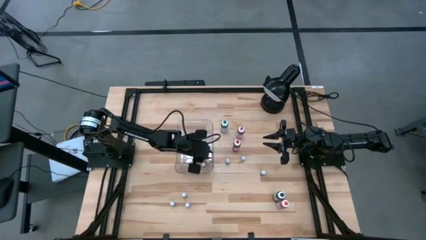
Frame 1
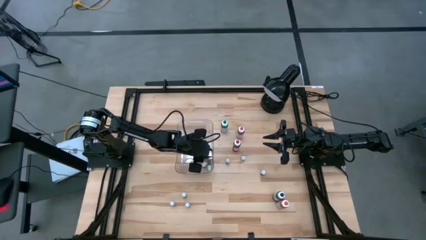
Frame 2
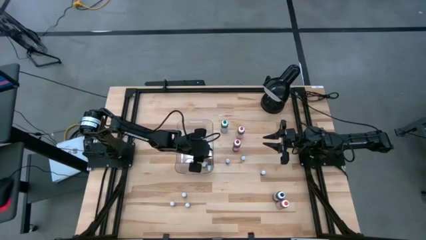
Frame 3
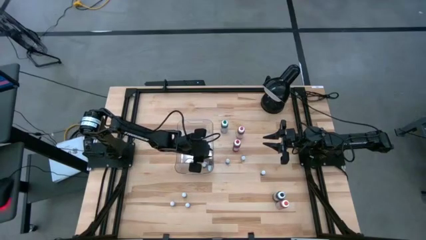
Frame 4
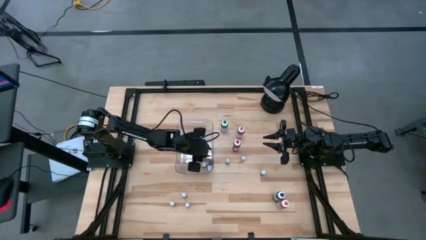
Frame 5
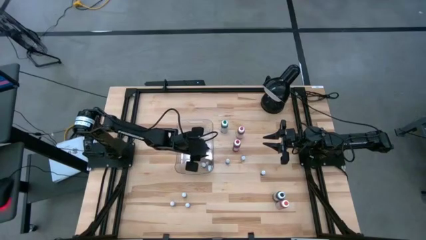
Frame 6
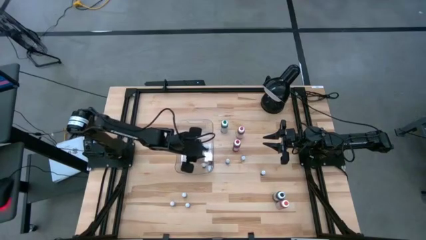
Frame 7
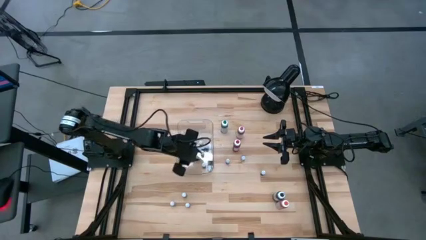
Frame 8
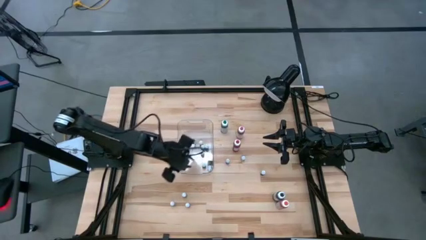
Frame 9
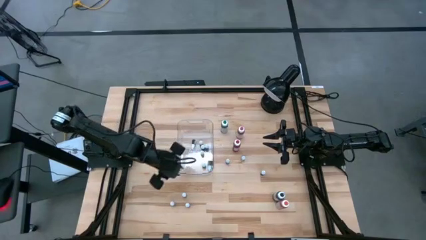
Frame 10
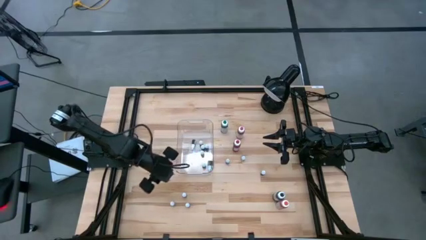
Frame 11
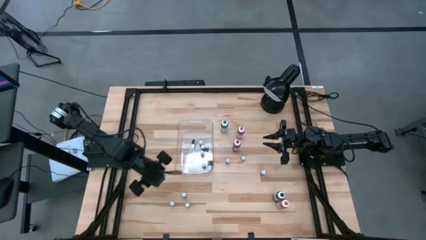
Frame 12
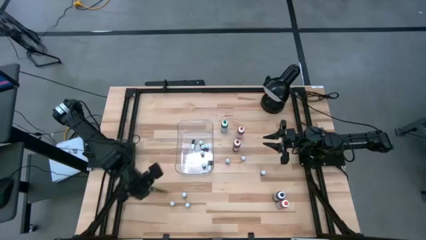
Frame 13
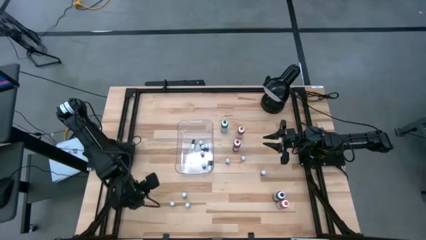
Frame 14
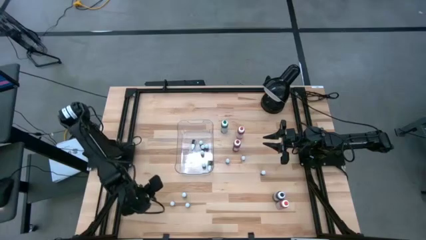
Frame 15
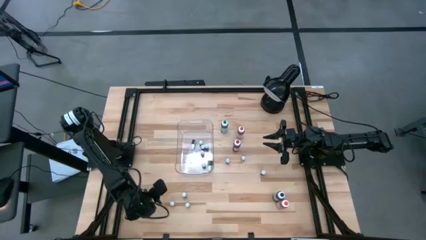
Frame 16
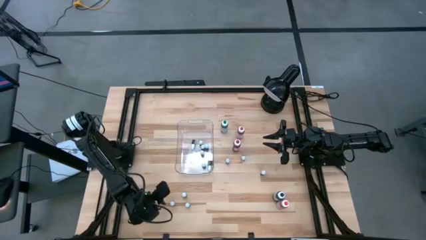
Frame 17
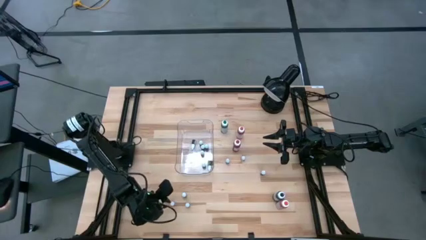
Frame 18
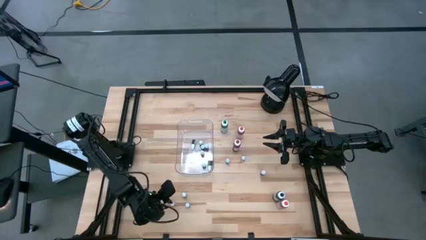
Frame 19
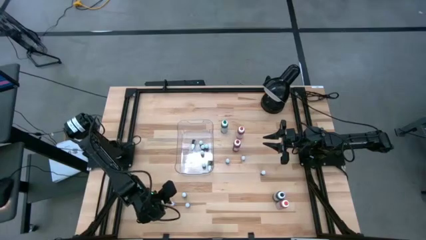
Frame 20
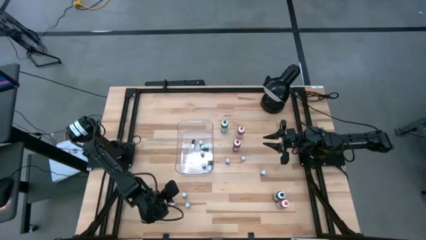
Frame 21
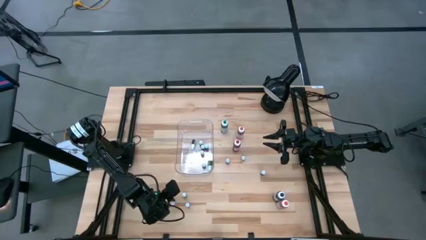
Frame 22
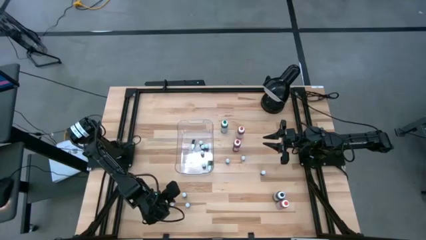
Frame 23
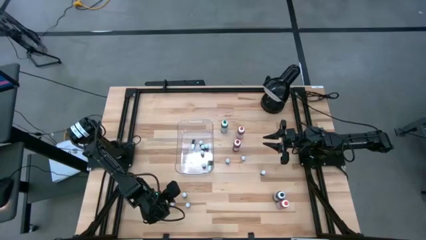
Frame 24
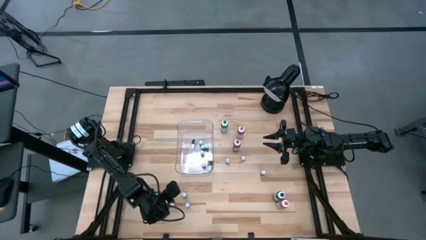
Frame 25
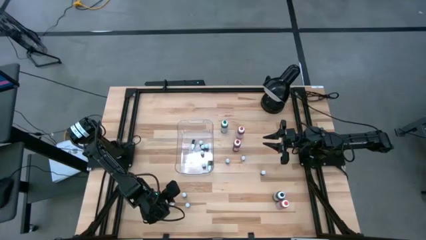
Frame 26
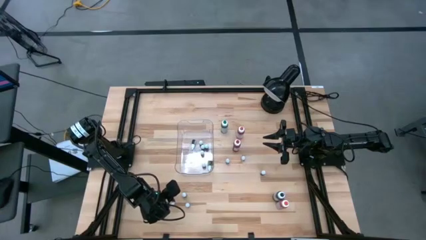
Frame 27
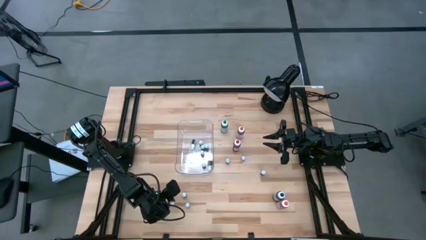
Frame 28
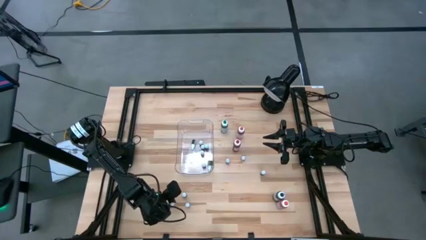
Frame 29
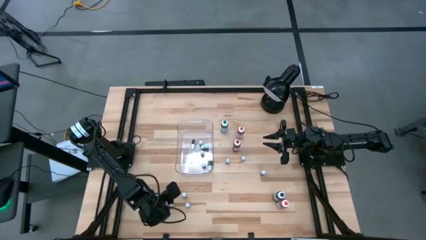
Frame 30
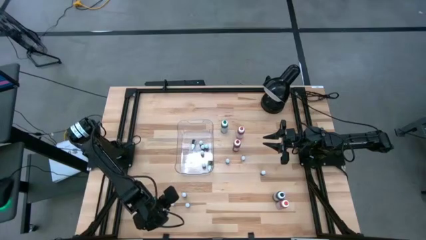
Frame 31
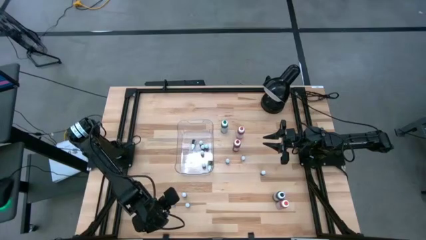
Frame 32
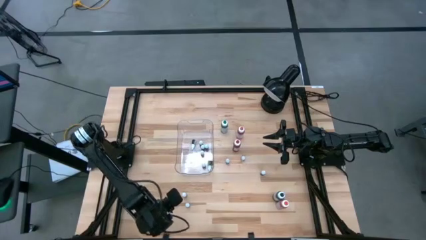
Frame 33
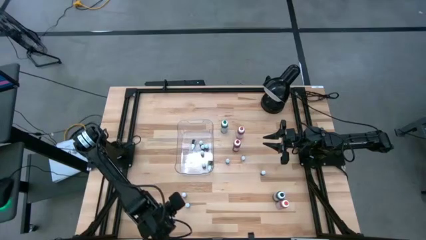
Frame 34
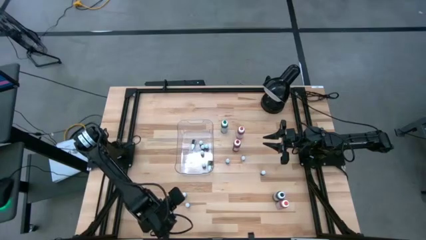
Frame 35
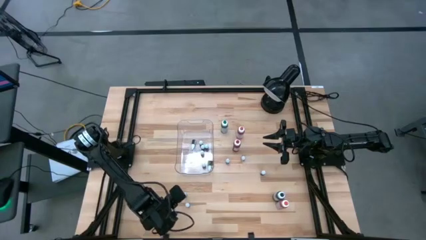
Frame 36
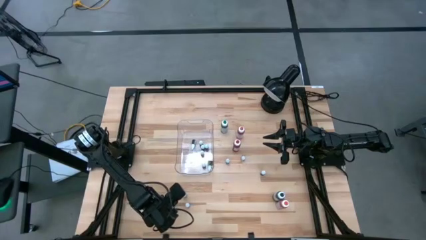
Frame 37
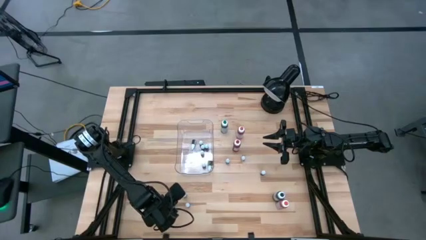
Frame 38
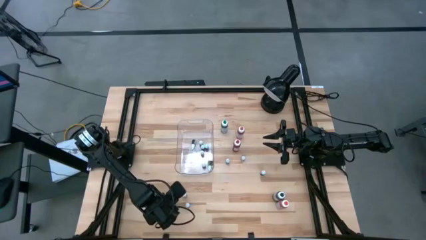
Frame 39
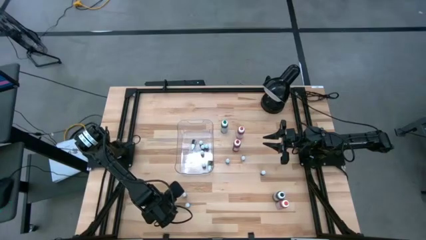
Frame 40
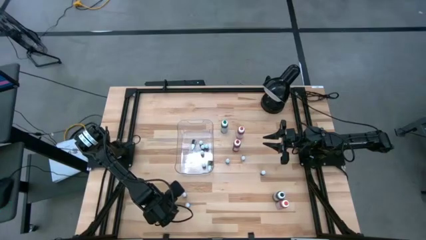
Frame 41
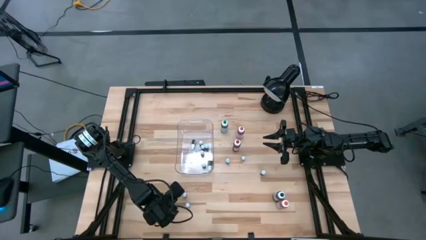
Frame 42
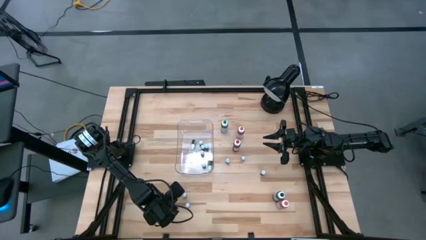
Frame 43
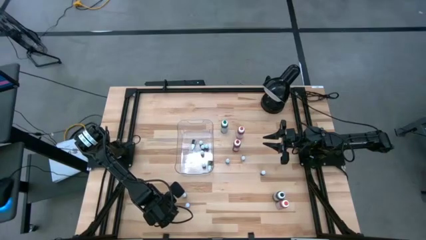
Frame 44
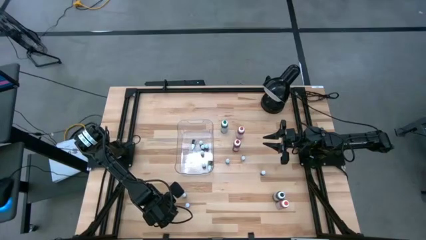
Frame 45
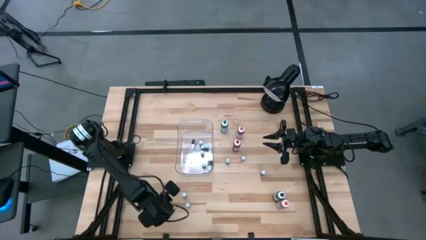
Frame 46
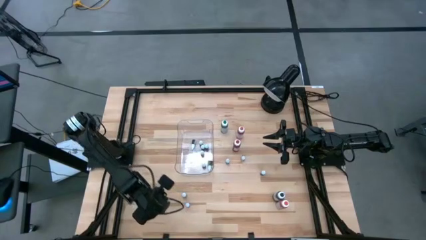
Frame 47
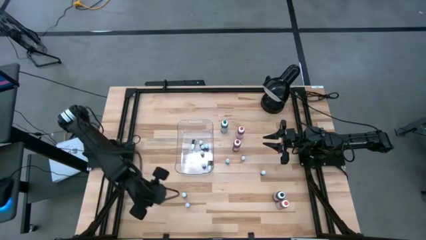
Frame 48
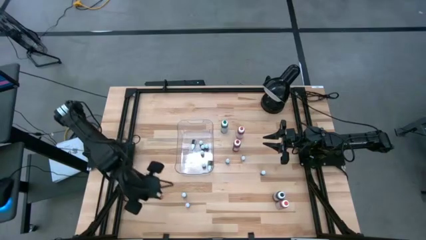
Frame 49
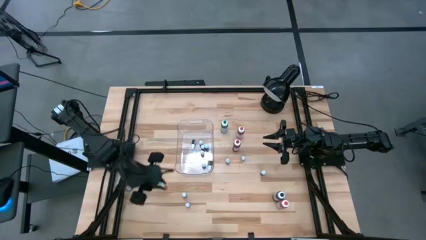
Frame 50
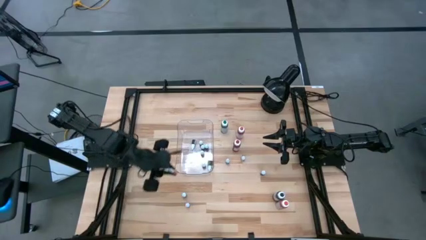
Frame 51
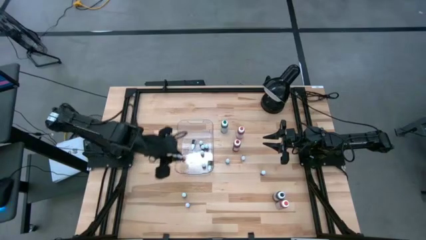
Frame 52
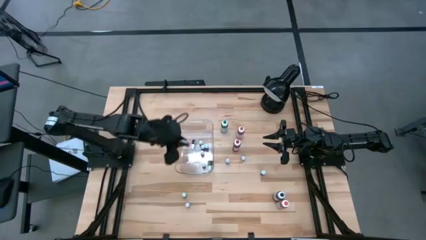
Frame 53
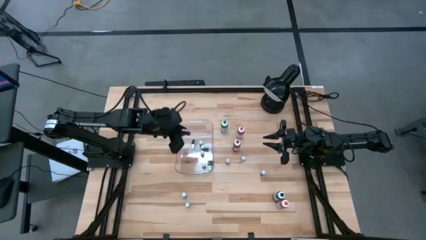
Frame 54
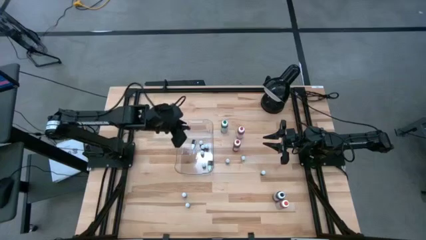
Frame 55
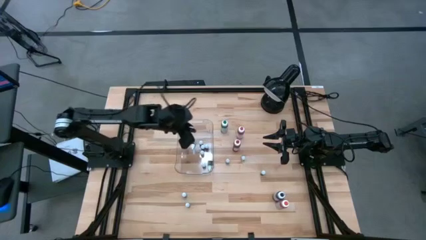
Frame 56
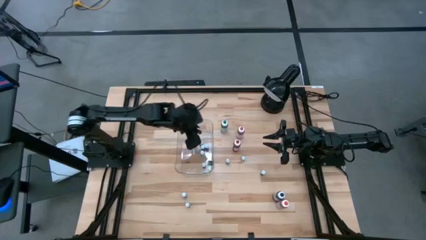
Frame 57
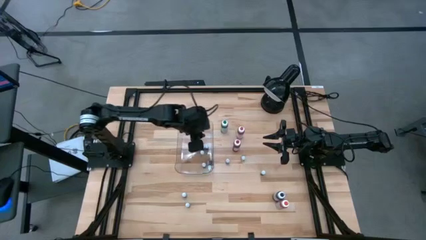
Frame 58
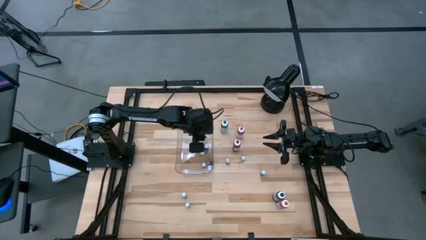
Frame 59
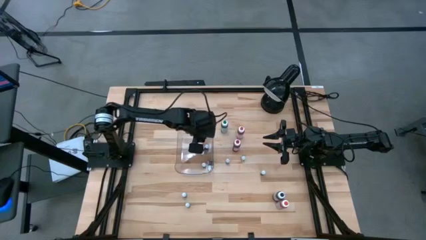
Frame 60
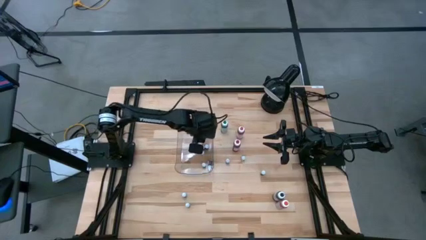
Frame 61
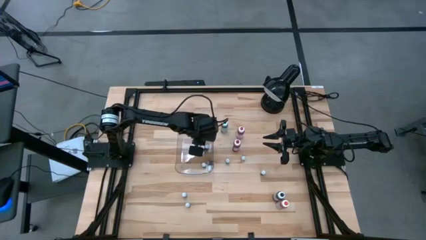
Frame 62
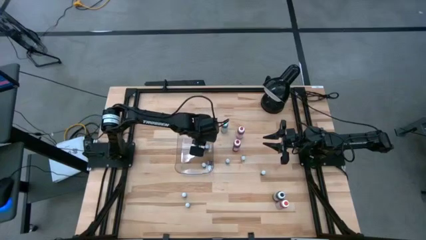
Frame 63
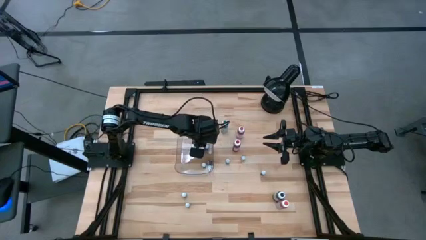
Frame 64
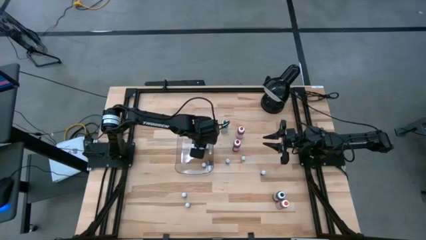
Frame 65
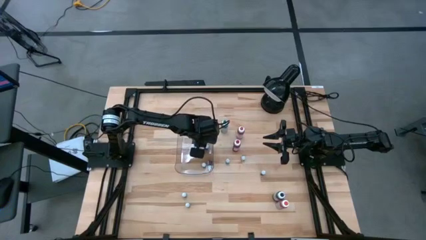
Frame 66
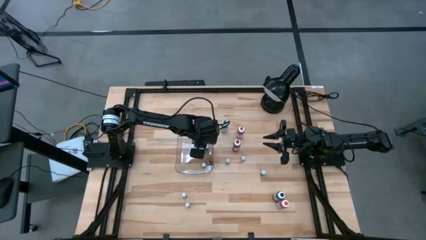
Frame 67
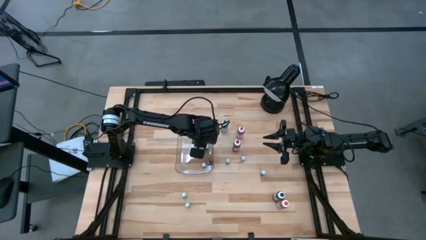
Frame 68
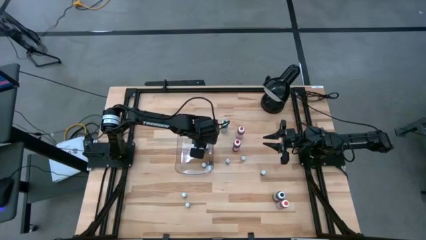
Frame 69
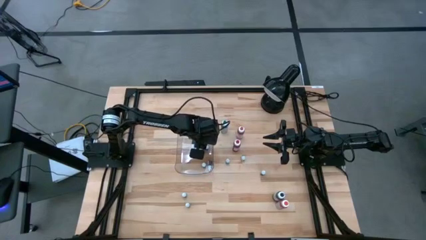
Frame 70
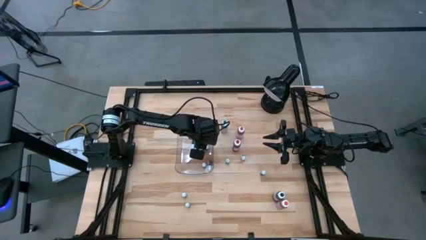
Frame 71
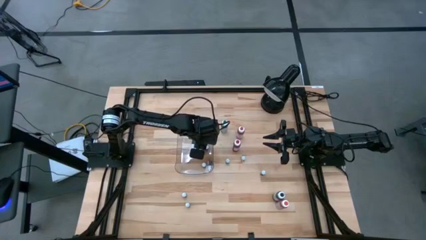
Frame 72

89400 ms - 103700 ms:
Task: Pick & Place food coloring
Put the small orange food coloring bottle into the transparent bin

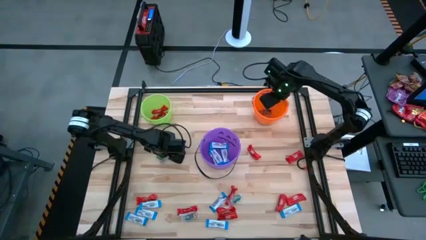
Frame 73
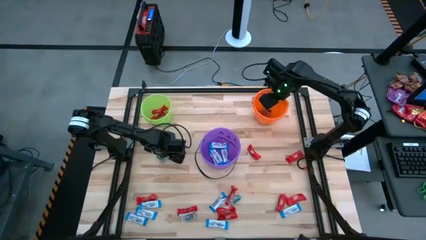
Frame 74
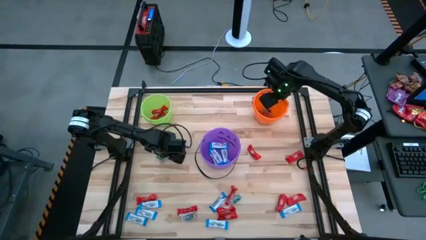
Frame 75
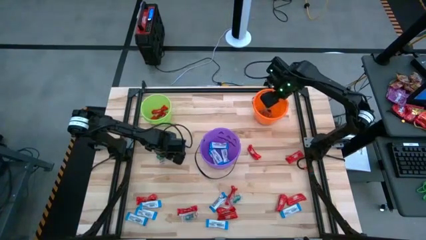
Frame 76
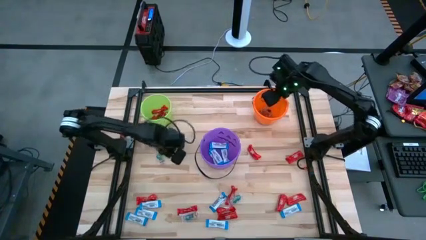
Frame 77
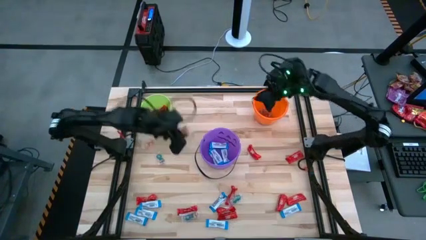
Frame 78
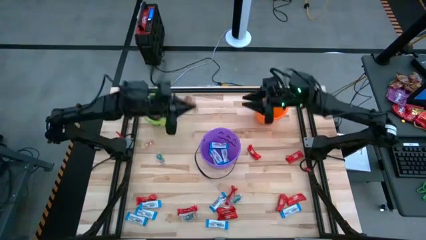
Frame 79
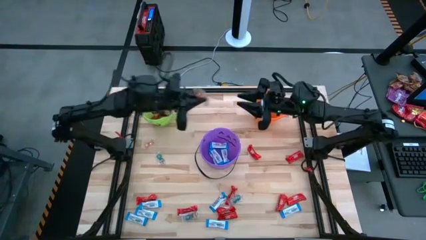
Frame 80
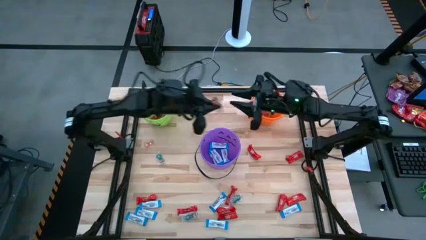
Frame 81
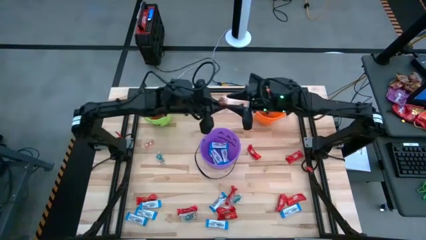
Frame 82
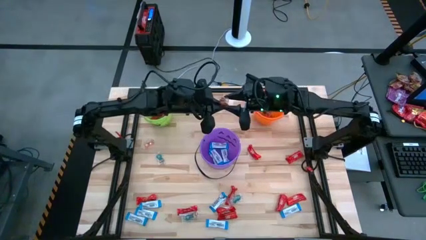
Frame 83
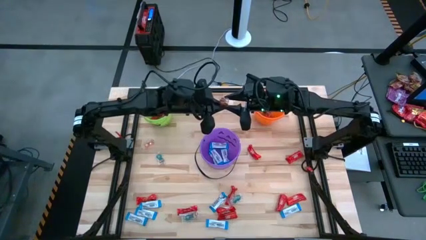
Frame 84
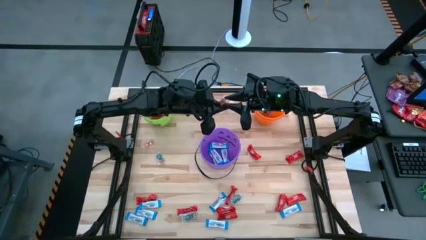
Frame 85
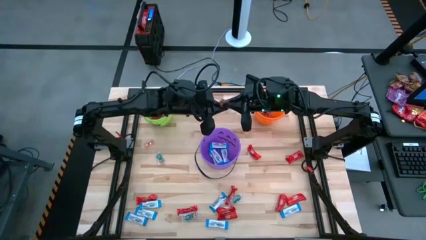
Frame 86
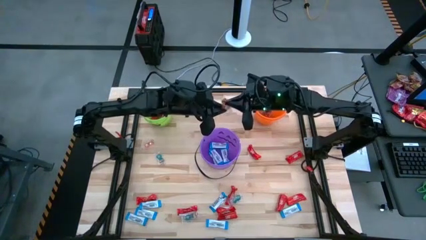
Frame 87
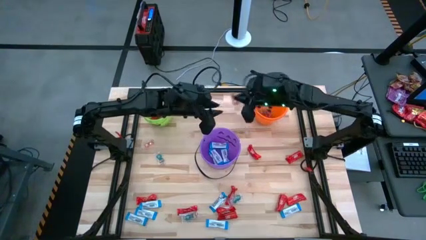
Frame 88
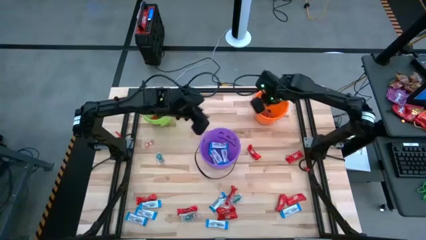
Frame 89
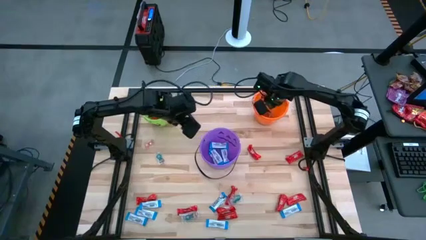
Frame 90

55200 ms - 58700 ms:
Task: Sort candy by brand, put in halloween buckets
Put the orange gummy into the orange bucket
